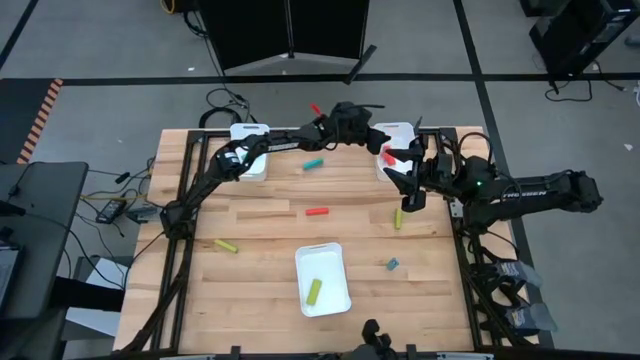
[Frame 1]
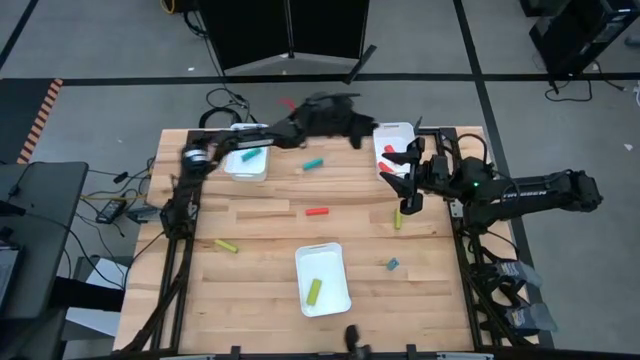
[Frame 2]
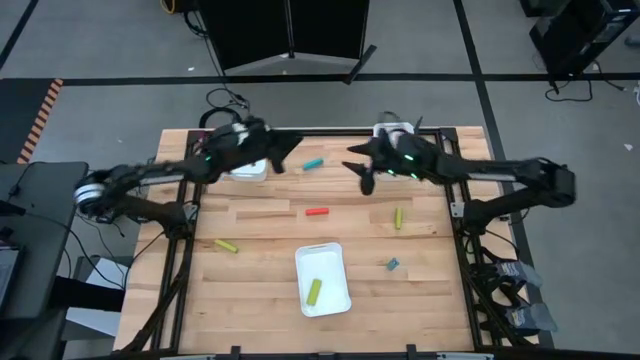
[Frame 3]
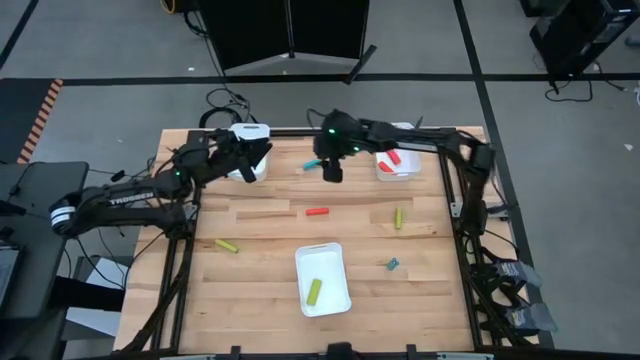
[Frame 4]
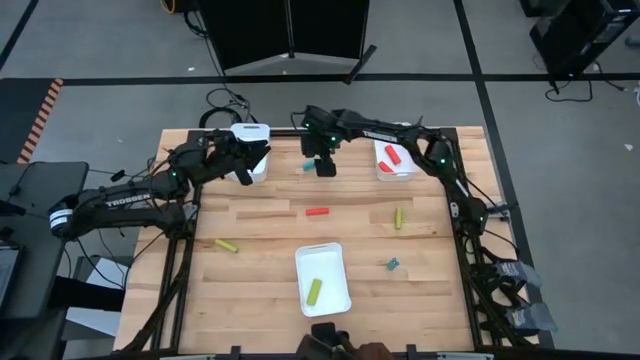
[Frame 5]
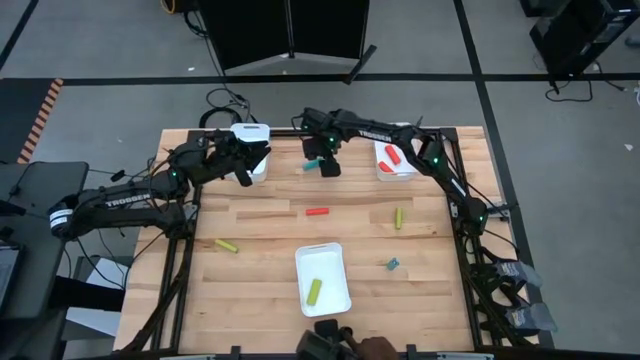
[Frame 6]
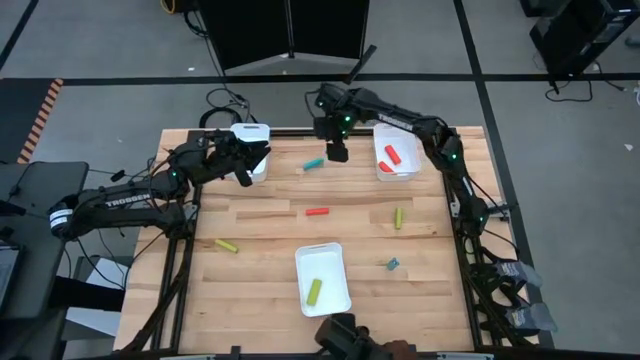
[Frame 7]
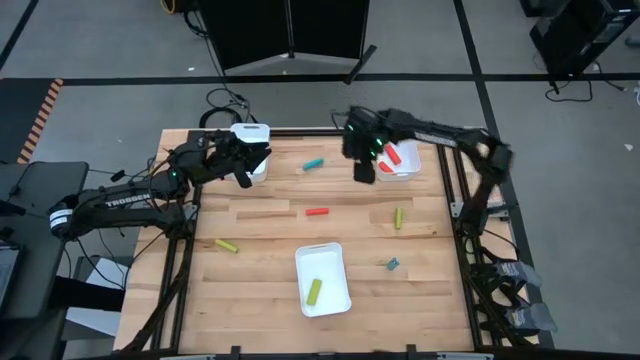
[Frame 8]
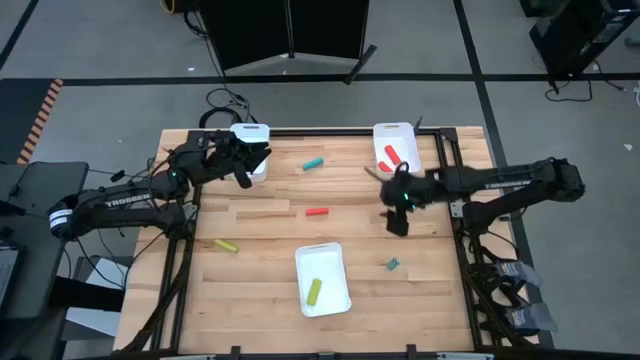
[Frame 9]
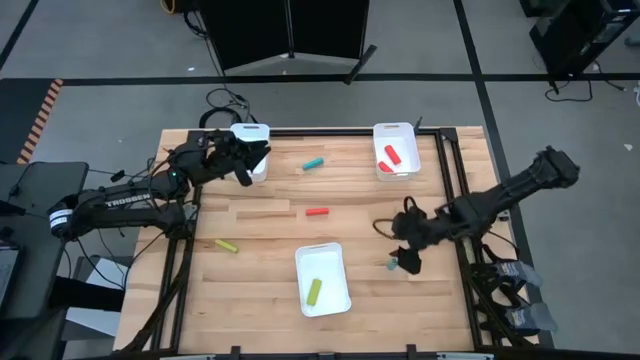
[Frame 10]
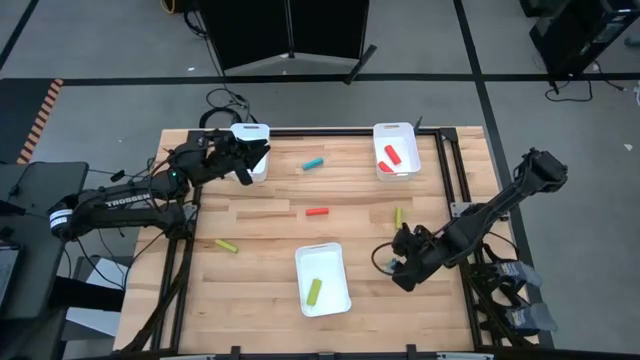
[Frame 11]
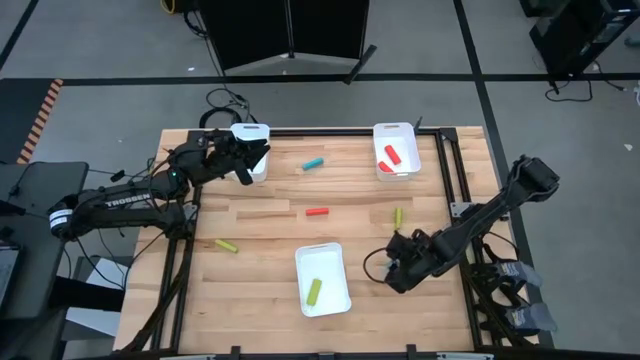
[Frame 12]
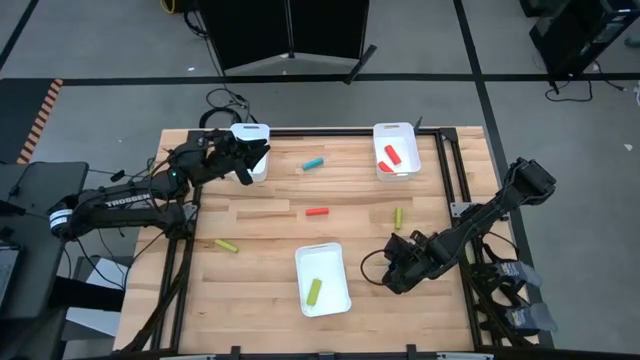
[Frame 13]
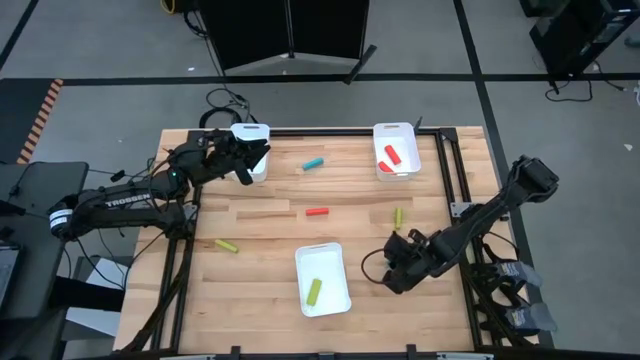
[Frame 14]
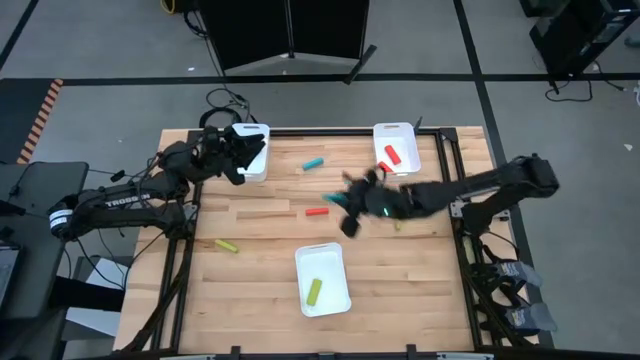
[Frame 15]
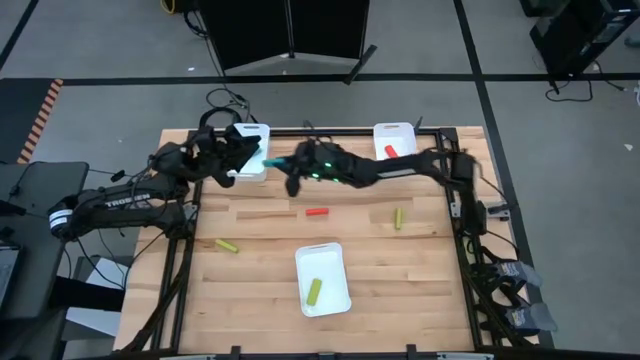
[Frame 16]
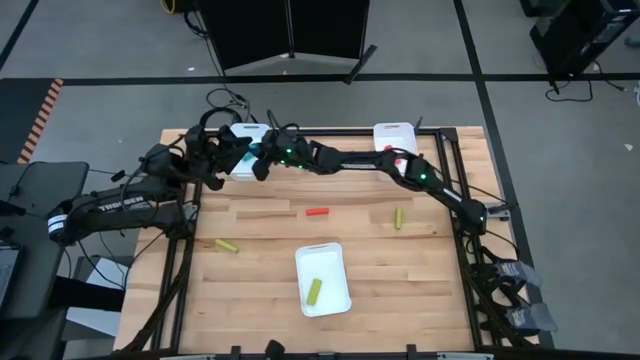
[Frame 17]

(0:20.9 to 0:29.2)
Task: Sort blocks
Put the bottom blue block into the top left white bin

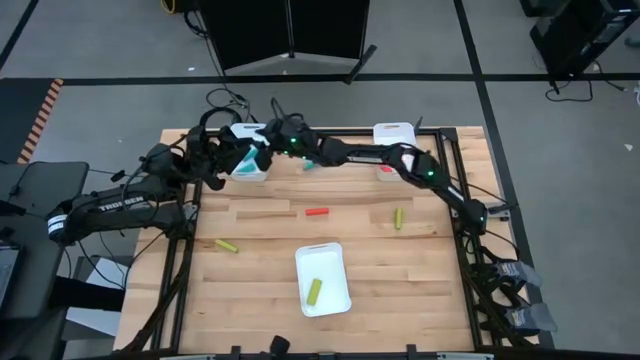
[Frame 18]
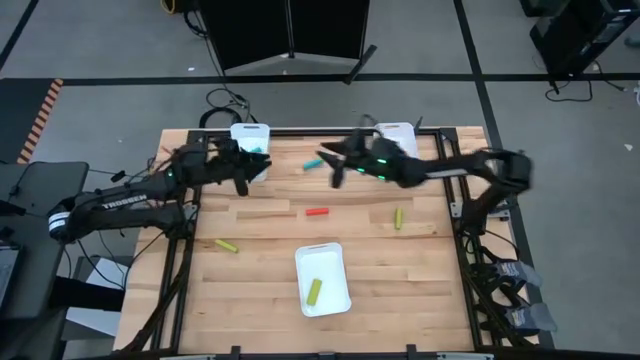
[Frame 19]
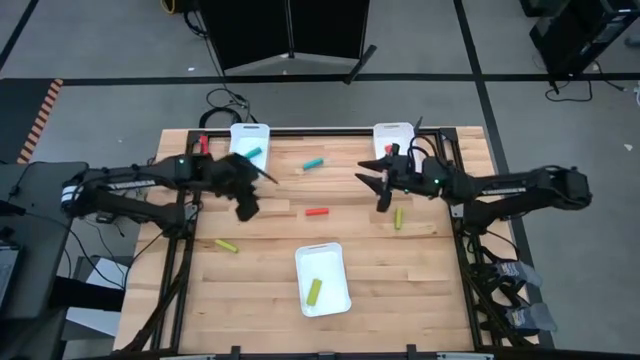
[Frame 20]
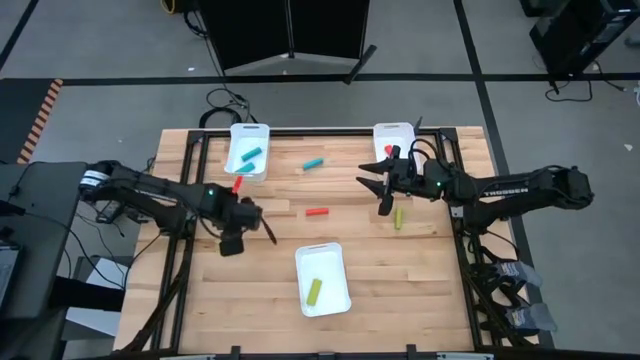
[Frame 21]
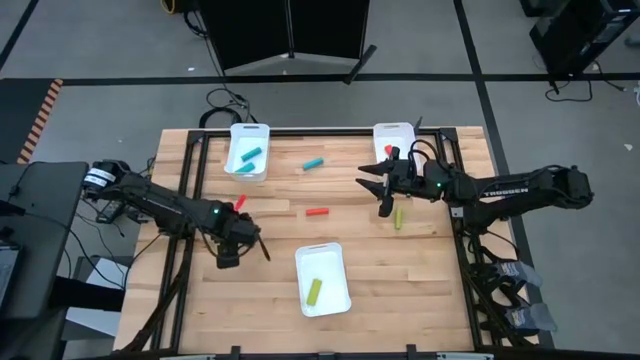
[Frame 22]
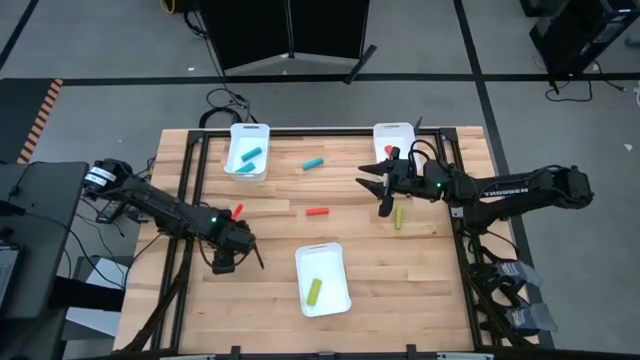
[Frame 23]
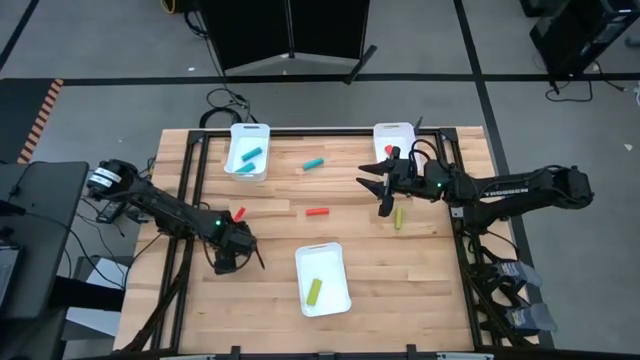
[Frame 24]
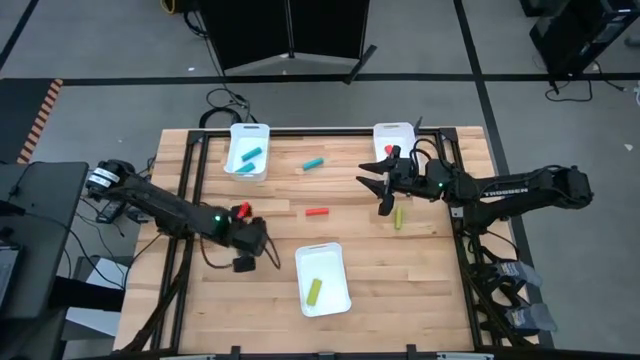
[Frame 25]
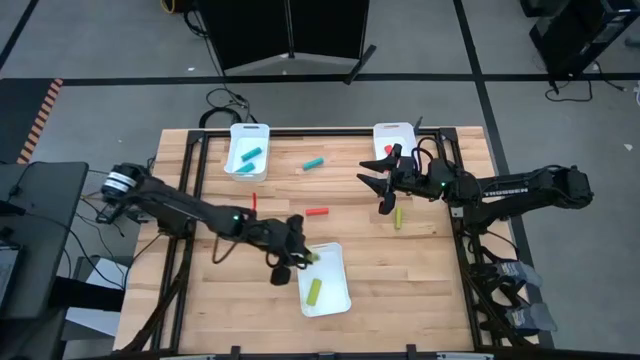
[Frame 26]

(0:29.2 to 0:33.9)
Put the left green block into the bottom center white bin

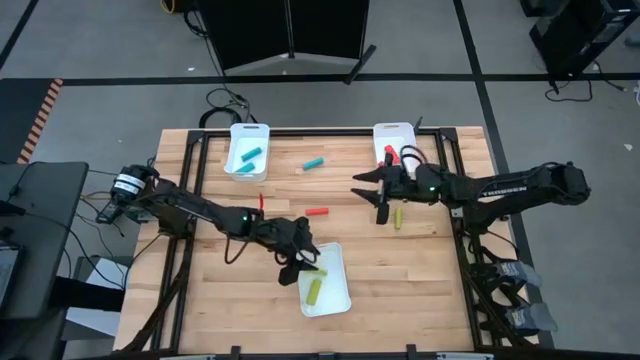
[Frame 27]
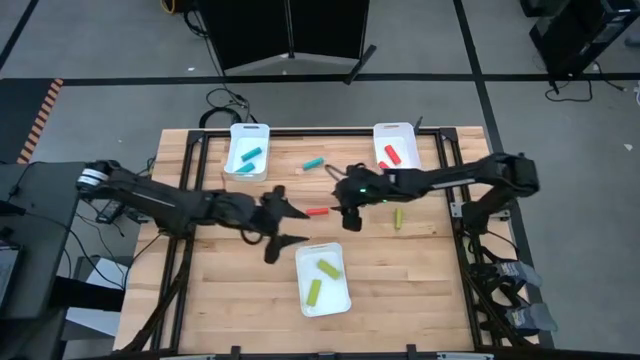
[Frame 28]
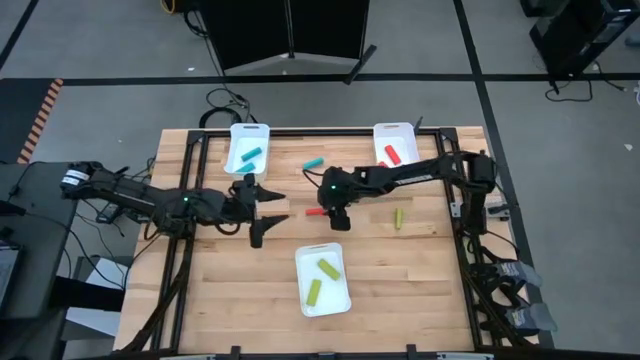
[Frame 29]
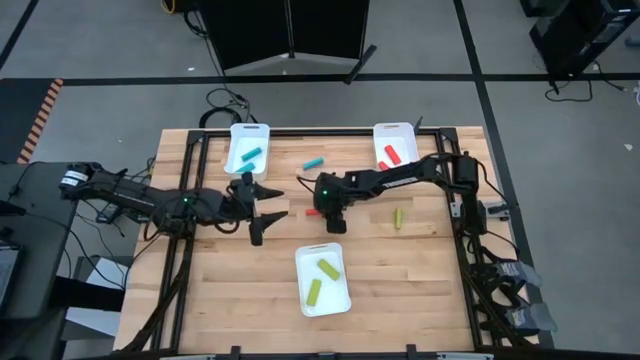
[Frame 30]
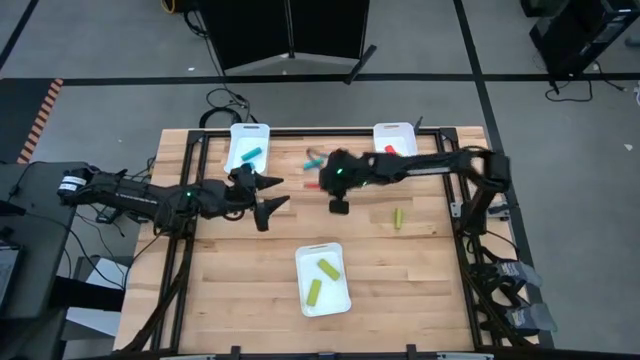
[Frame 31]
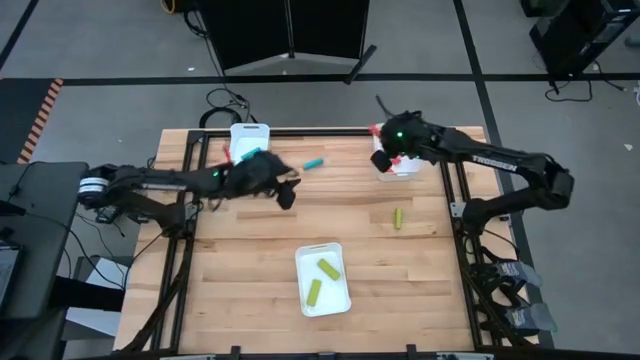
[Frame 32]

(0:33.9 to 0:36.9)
Put the orange block into the top right white bin

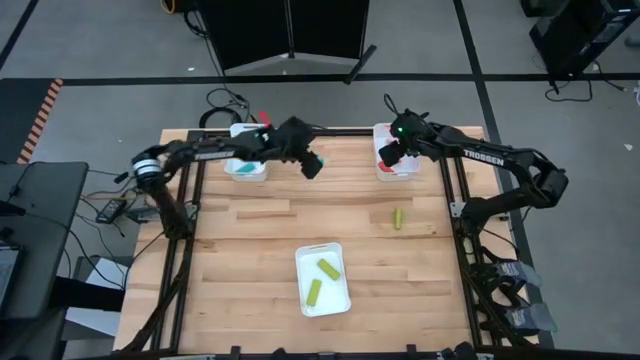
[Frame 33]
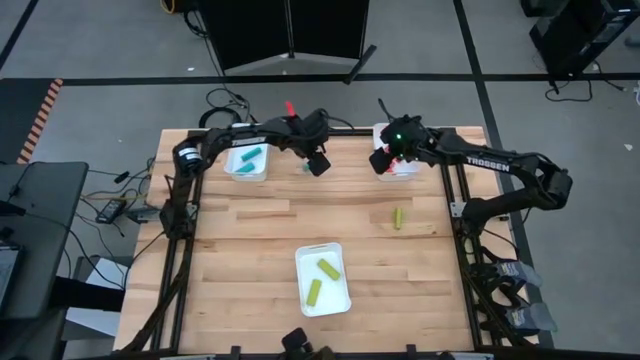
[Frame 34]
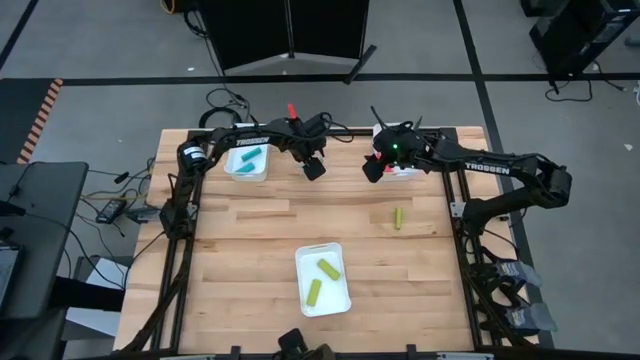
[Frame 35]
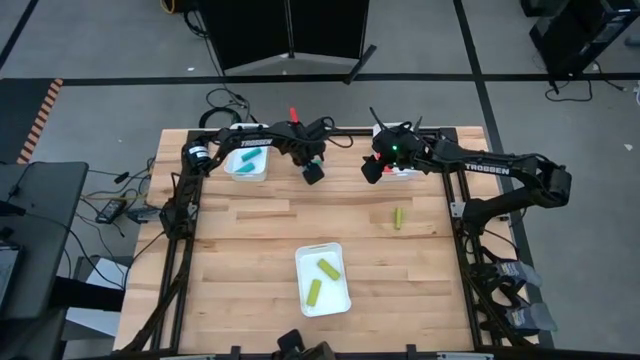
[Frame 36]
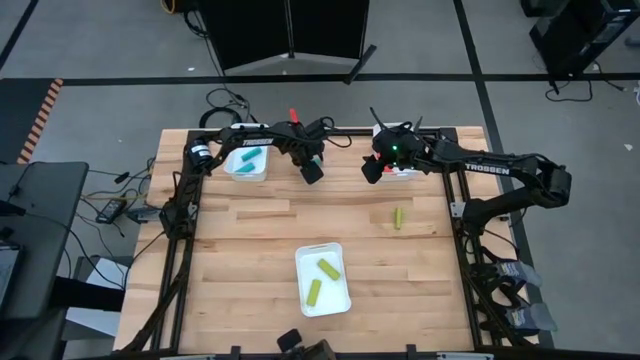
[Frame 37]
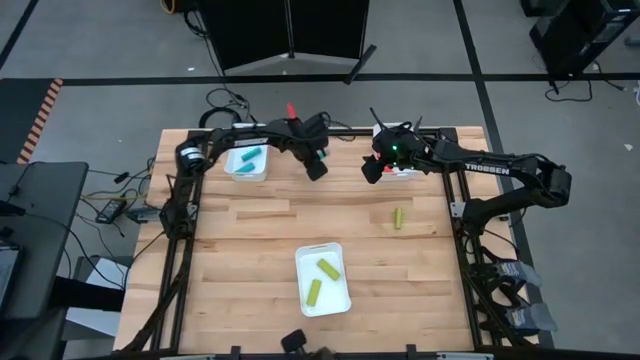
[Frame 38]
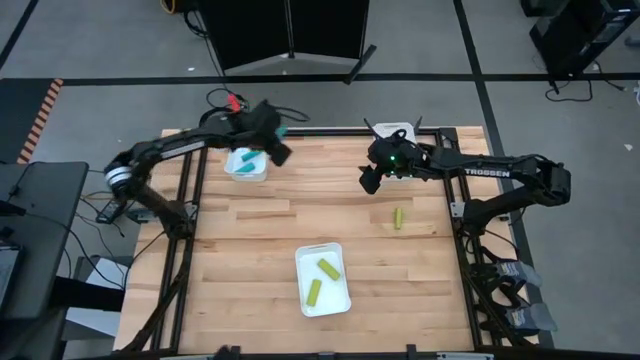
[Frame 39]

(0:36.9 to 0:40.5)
Put the blue block into the top left white bin

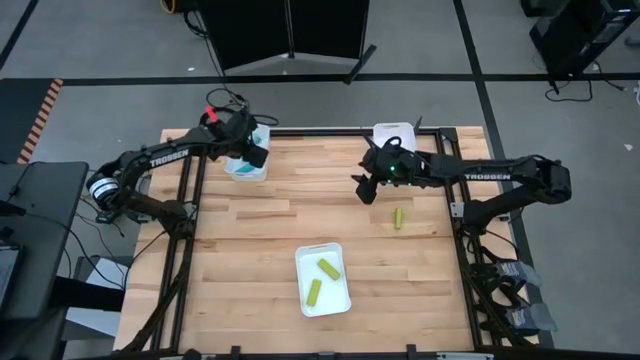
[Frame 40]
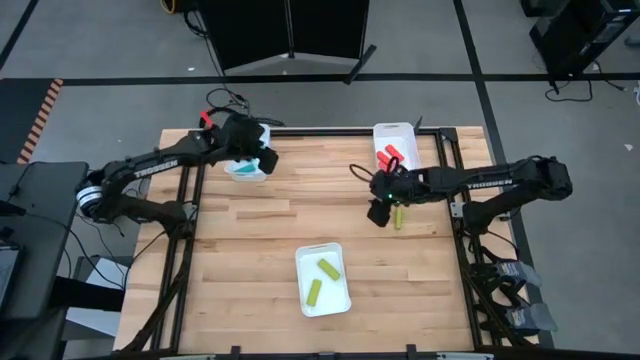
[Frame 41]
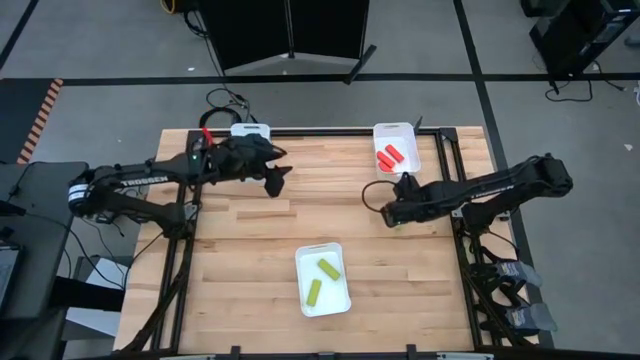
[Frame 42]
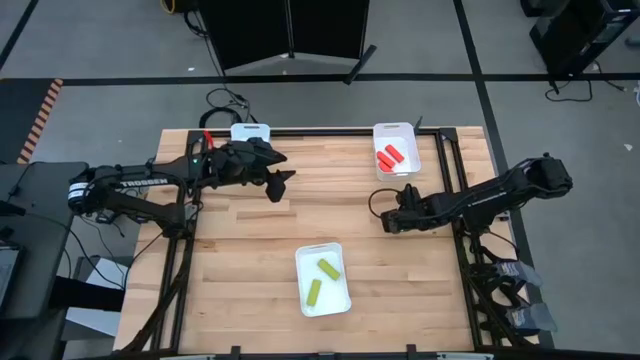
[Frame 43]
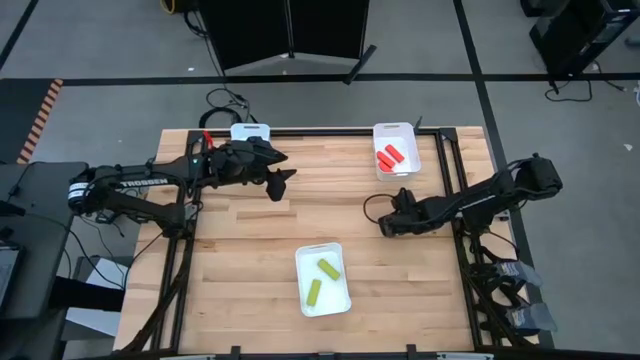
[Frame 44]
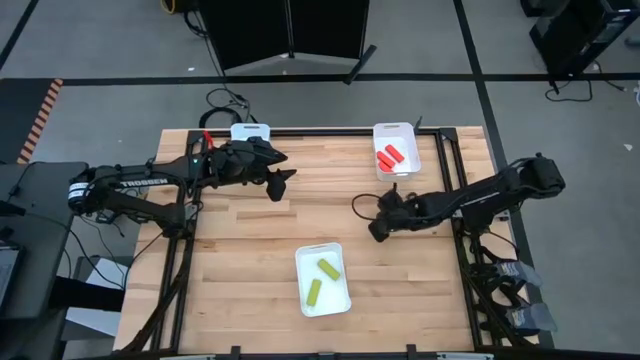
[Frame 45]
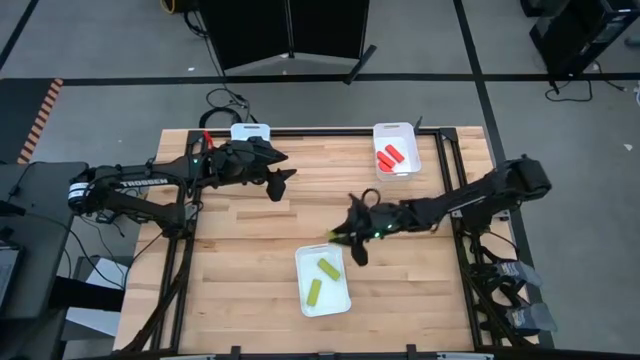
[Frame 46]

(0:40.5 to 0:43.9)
Put the green block into the bottom center white bin
